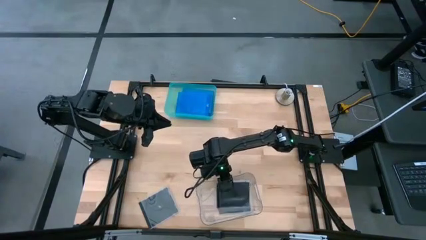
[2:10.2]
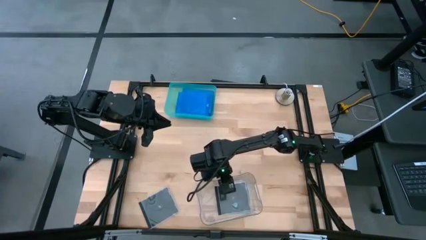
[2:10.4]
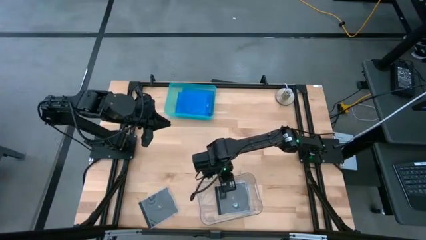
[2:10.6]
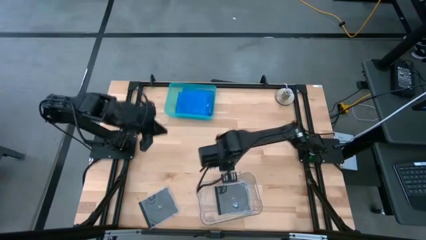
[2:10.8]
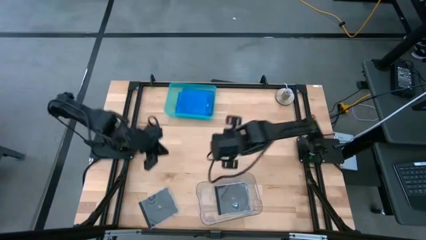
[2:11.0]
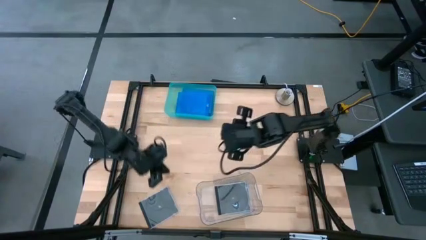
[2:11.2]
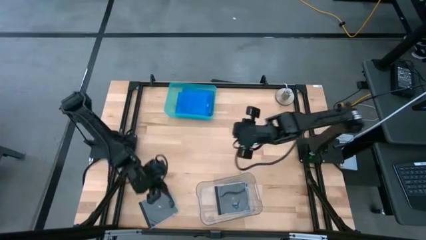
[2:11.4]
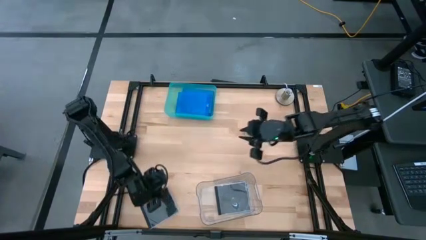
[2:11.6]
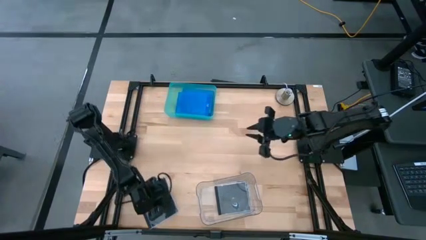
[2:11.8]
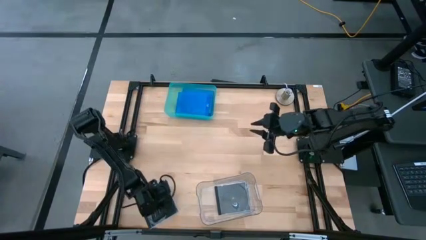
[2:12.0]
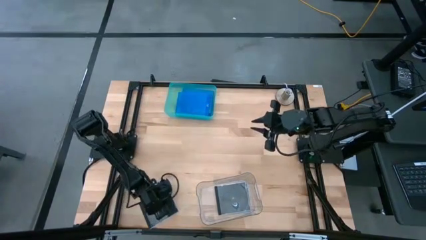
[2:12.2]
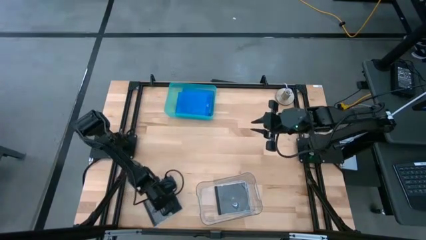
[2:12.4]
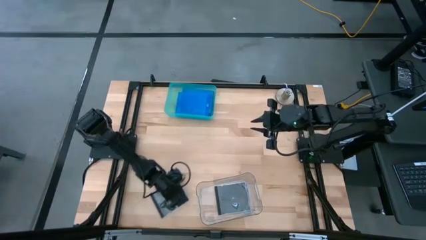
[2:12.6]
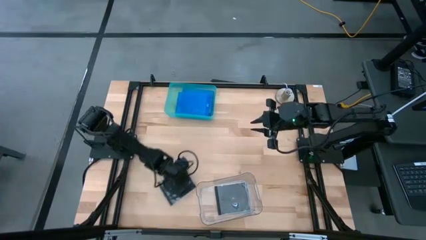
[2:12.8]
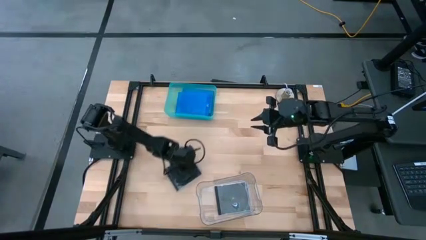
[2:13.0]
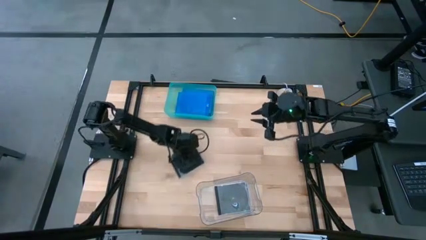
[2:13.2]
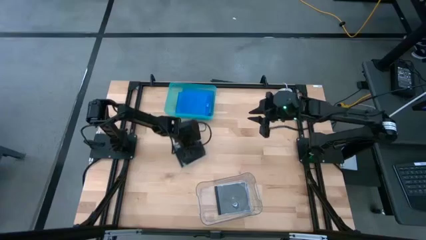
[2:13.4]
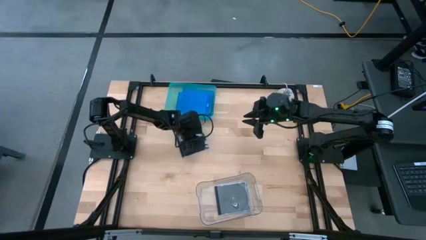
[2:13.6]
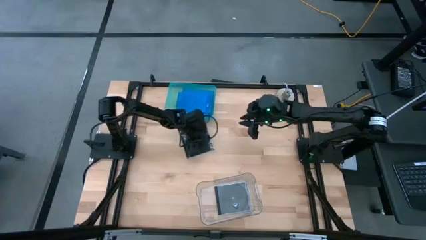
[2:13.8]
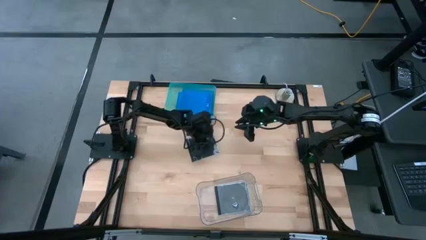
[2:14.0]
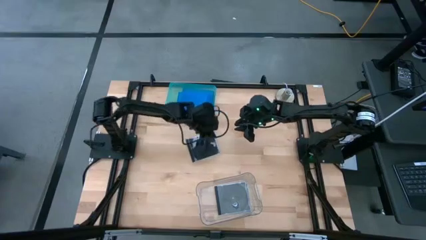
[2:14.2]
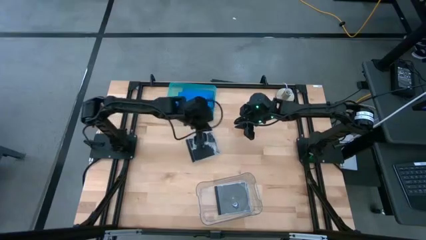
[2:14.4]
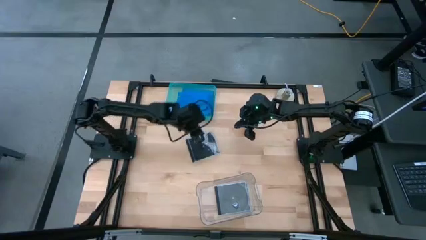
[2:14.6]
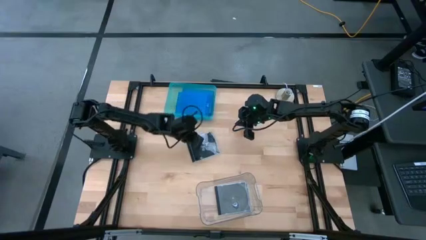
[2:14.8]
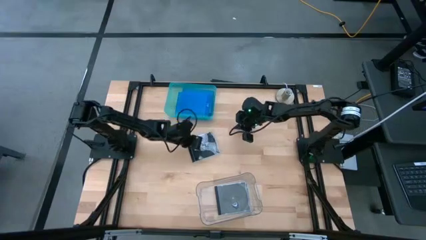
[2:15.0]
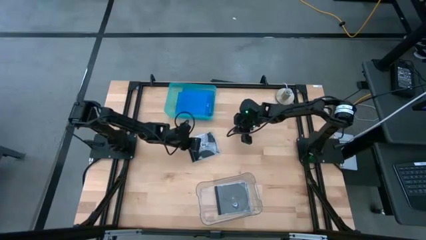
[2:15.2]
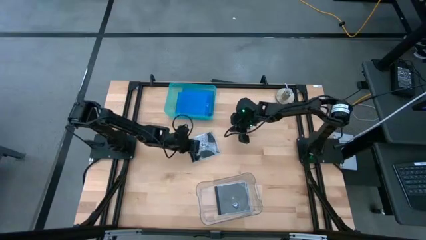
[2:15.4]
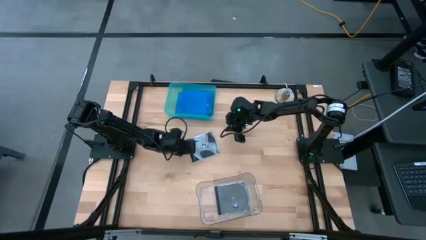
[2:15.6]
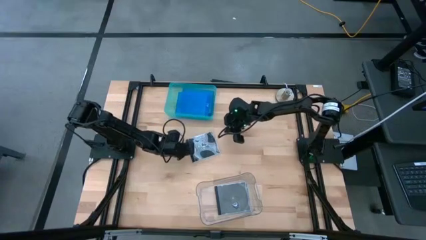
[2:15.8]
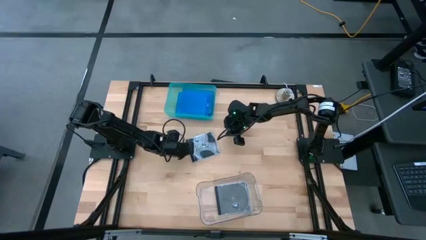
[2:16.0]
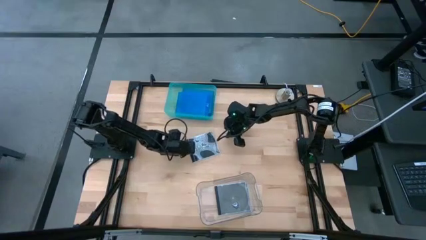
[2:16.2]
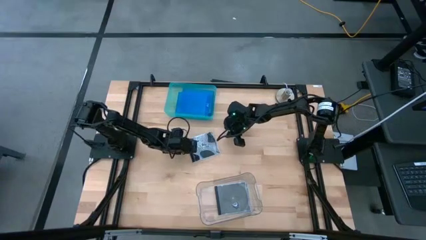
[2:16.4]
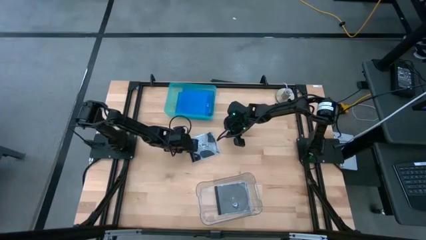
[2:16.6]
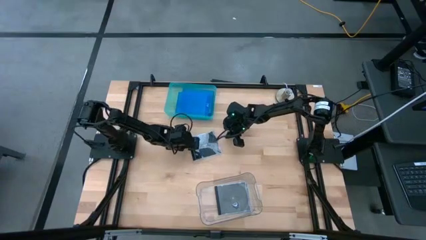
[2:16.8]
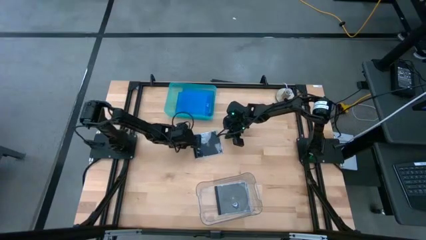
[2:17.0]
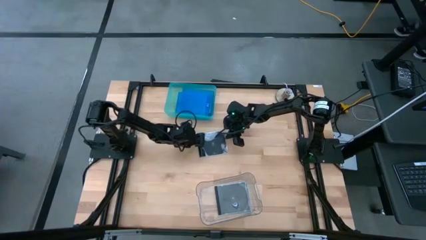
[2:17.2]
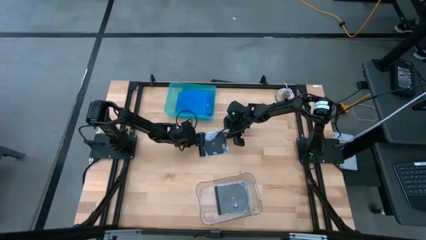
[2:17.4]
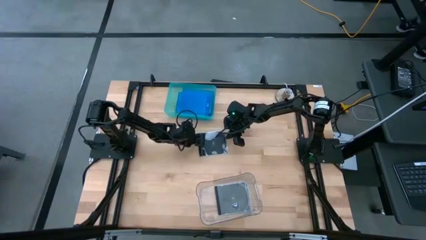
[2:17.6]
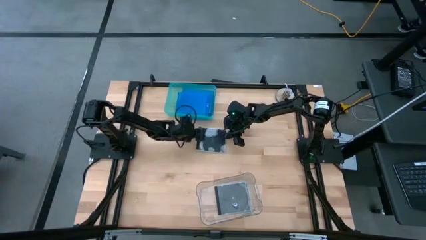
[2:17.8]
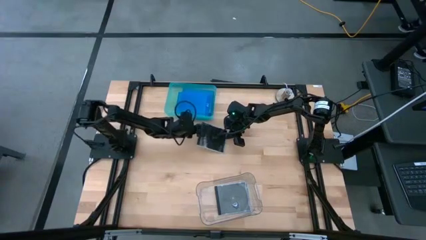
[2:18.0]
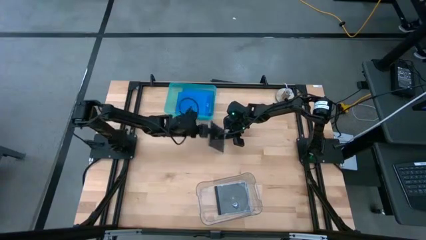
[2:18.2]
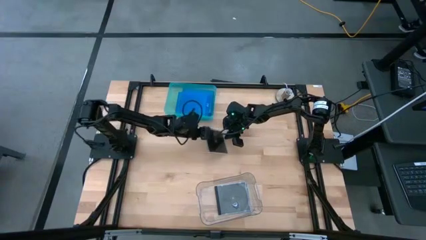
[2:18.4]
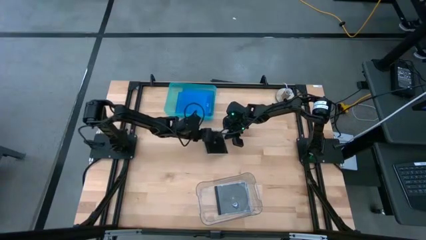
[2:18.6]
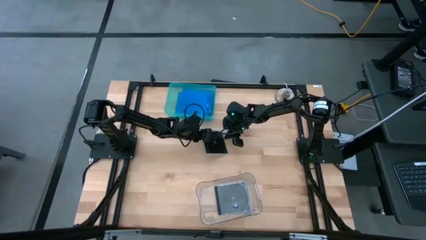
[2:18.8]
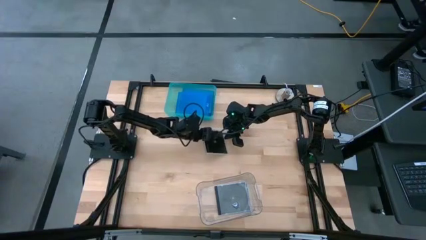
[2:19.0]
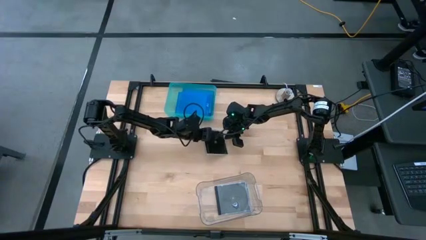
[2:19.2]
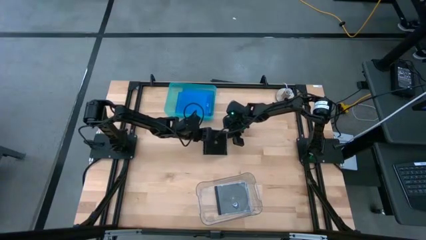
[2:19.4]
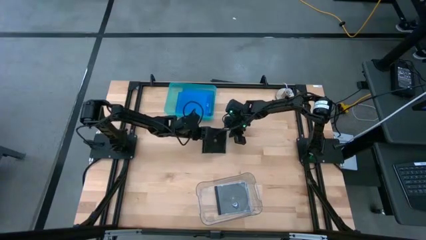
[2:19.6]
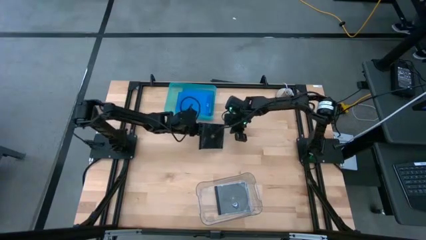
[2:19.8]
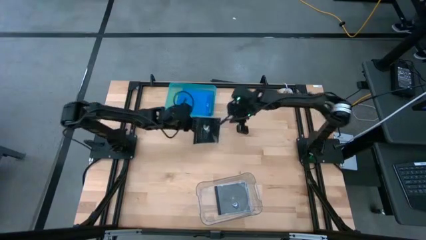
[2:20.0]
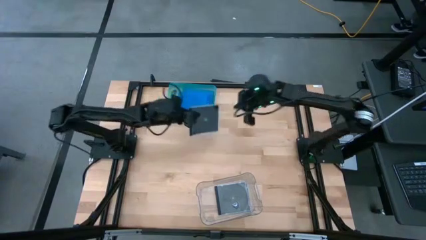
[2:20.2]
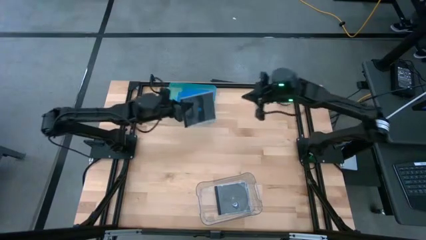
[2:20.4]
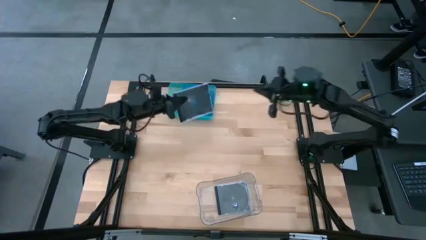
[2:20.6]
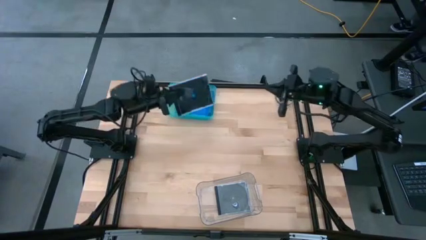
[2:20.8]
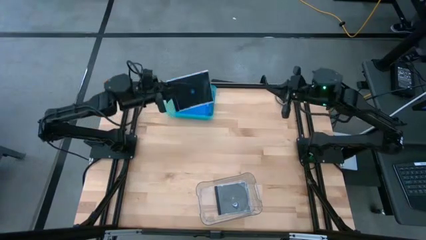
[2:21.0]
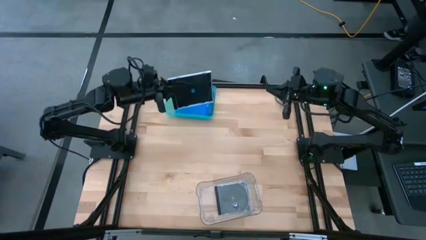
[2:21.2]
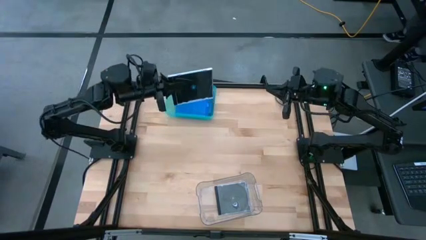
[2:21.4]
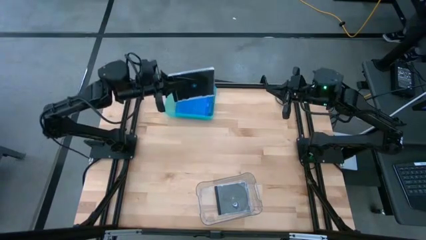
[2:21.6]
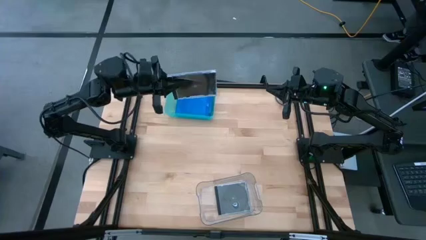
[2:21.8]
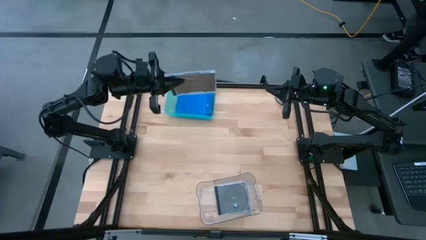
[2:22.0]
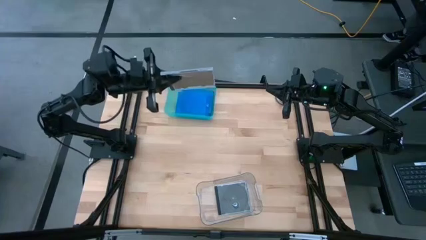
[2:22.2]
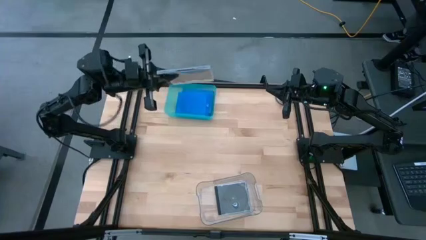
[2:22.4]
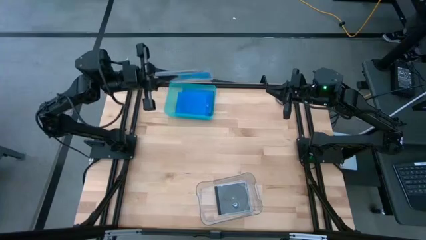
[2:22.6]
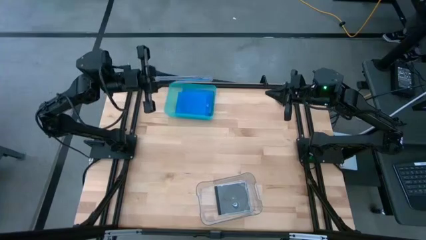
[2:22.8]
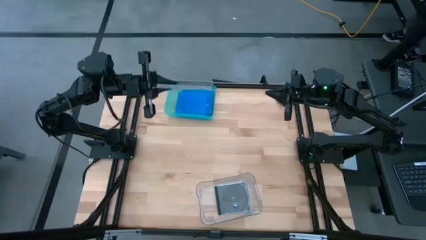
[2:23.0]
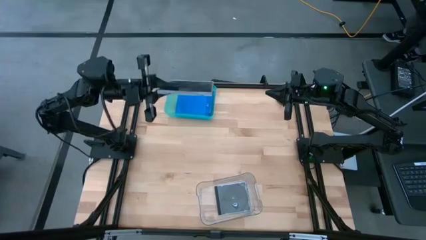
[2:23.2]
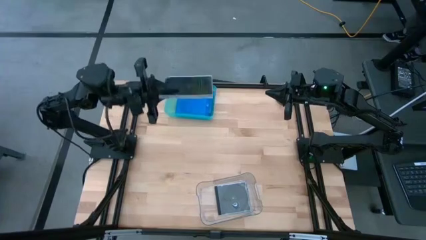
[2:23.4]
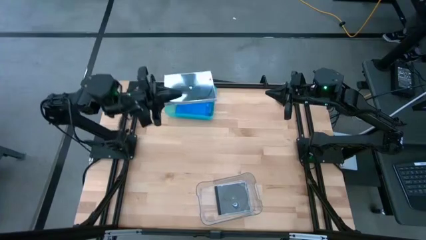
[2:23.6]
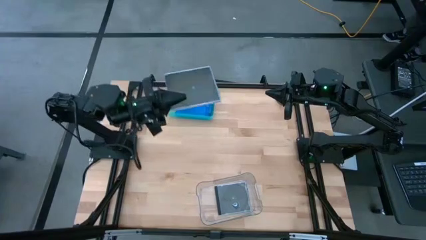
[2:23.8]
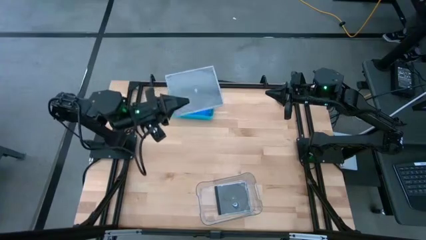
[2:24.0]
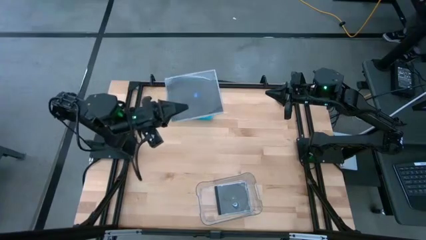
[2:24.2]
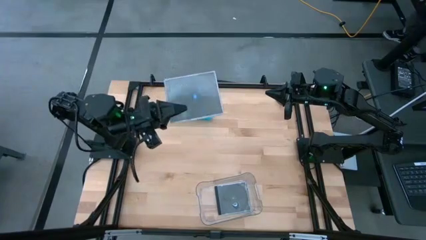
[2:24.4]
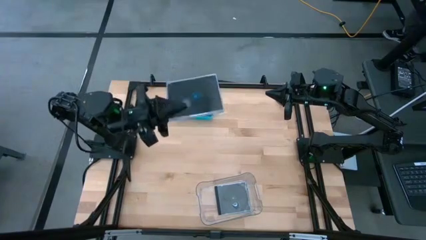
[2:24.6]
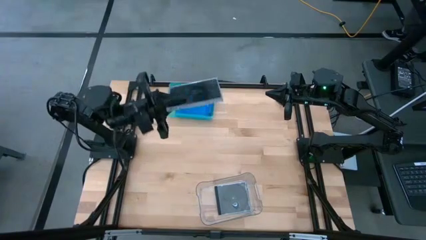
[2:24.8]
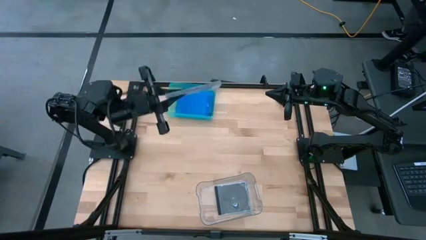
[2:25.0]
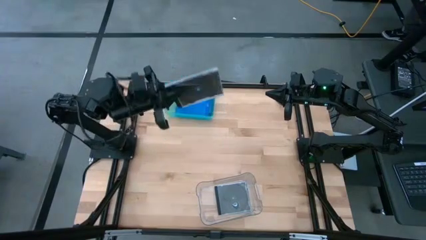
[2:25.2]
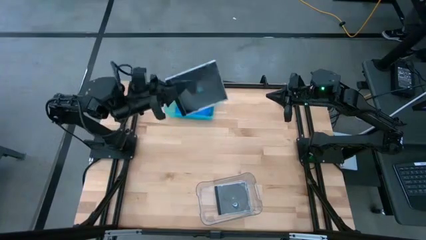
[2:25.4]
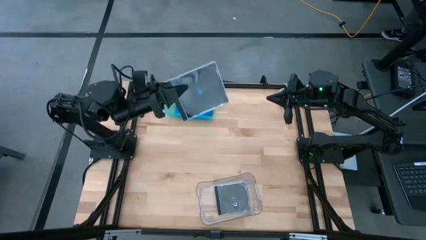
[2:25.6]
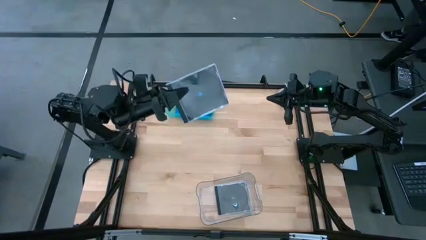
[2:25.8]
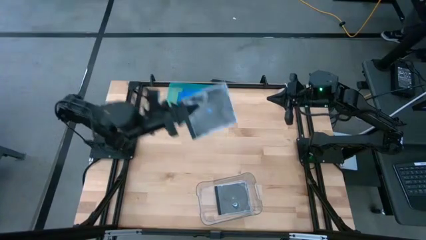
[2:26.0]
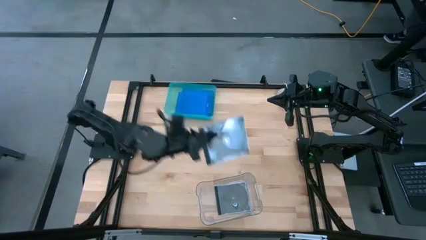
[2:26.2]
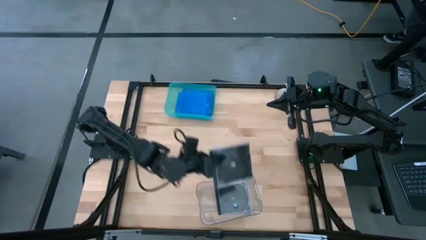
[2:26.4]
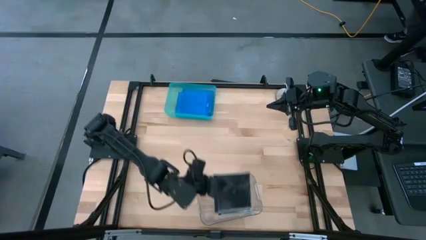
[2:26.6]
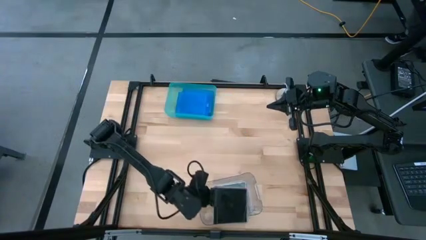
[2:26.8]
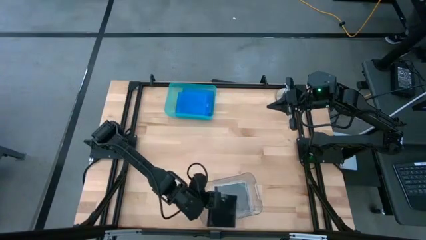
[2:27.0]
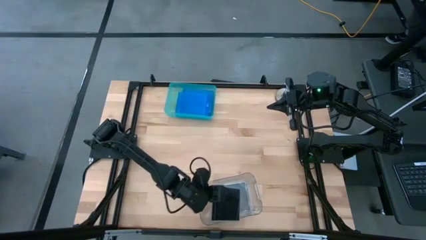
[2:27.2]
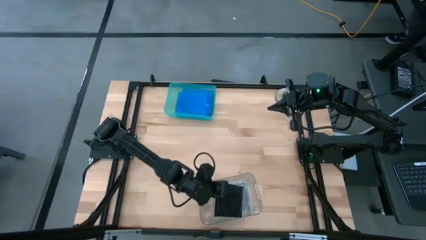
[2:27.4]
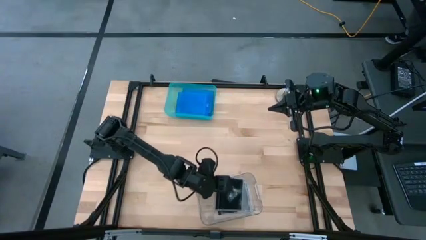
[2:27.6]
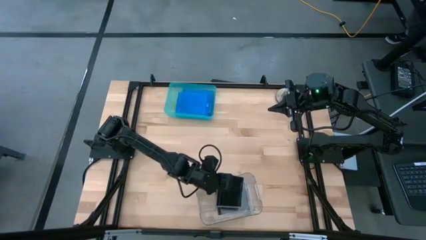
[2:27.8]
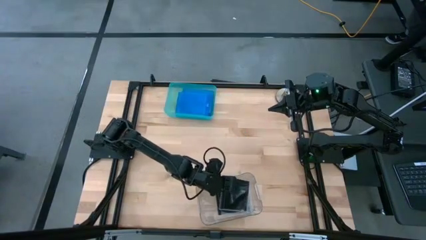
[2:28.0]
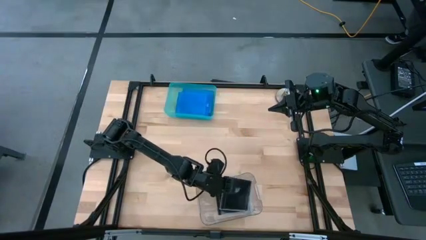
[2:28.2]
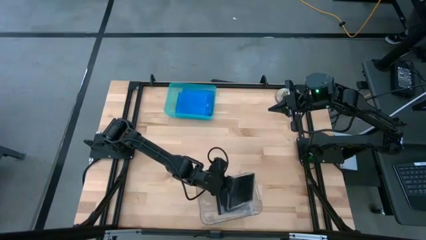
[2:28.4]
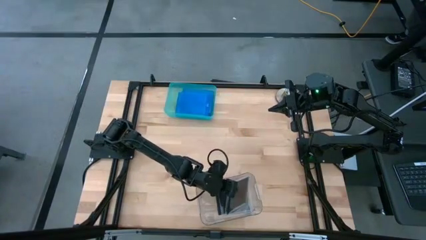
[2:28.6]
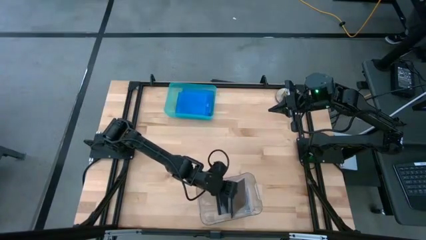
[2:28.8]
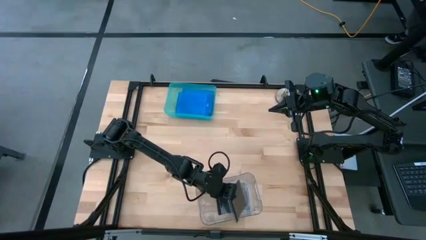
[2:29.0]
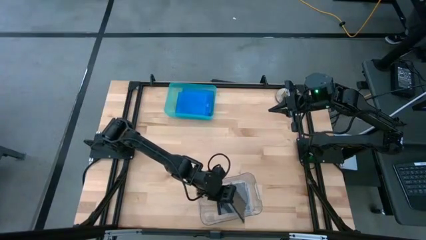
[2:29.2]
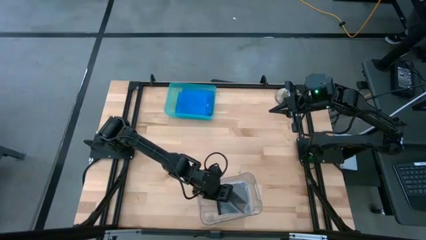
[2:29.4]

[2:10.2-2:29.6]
Task: Pick & place jewel cases by type
Put the black CD case into the transparent bin
